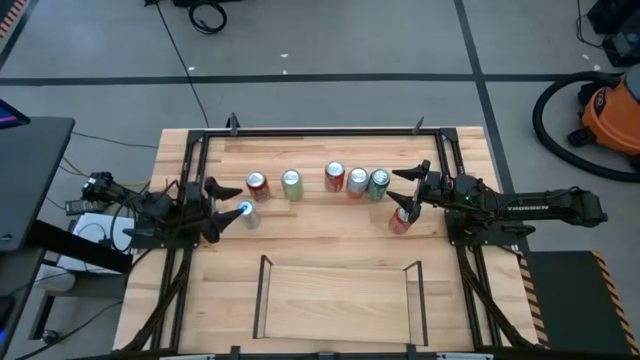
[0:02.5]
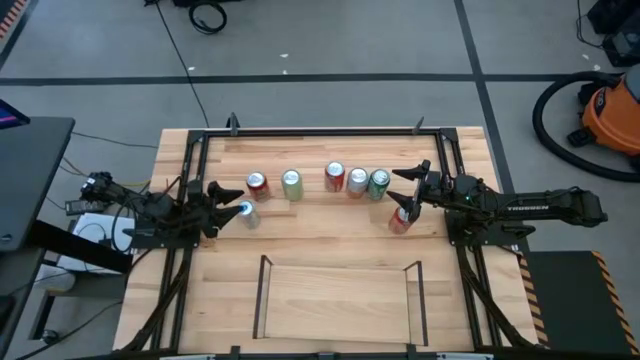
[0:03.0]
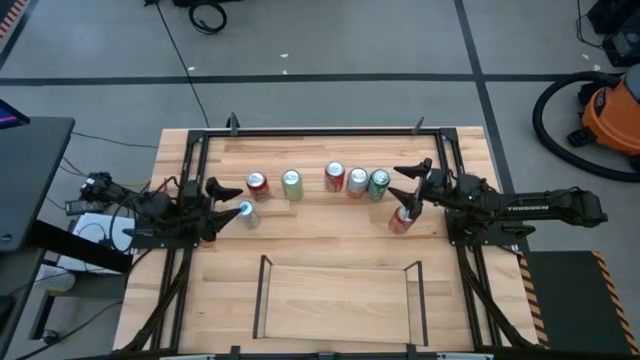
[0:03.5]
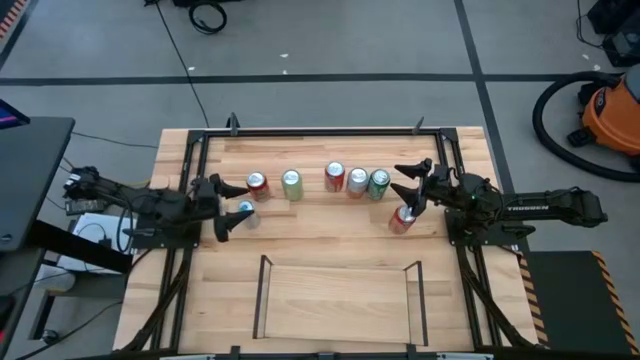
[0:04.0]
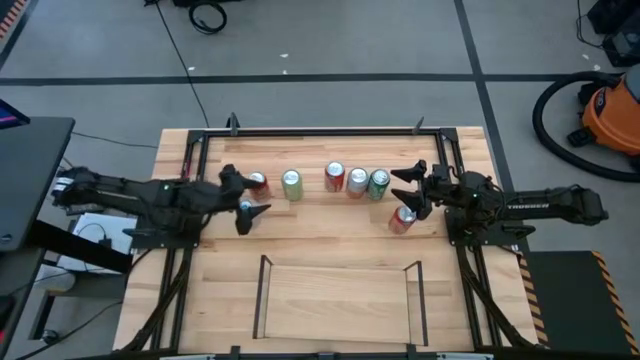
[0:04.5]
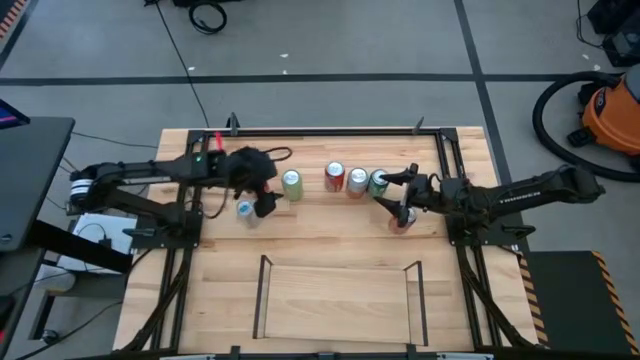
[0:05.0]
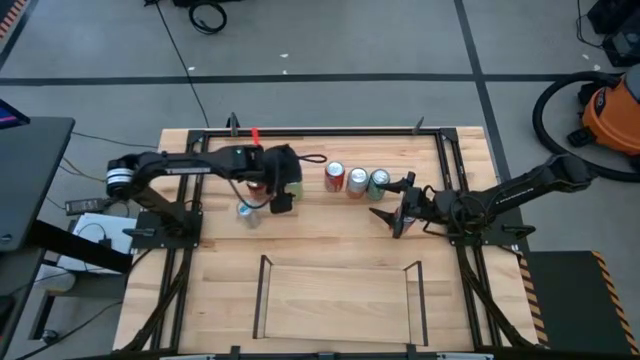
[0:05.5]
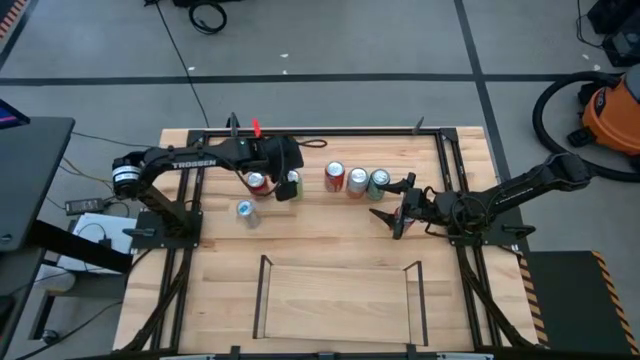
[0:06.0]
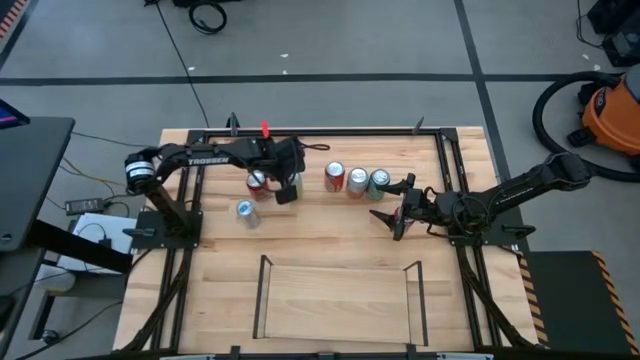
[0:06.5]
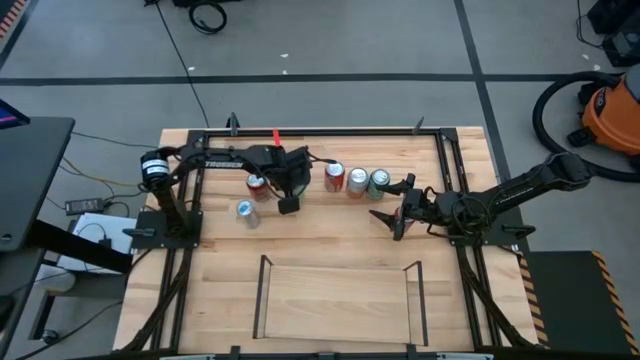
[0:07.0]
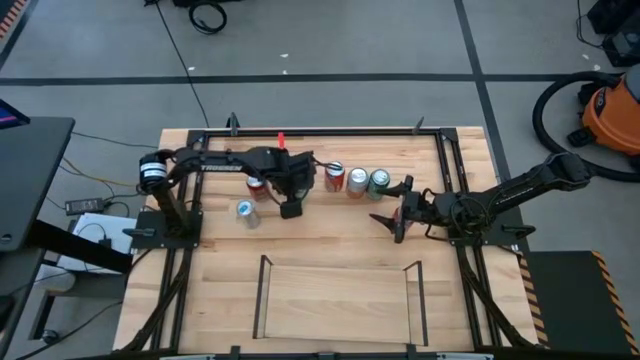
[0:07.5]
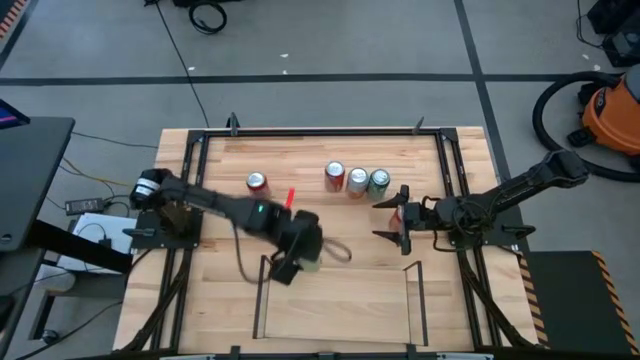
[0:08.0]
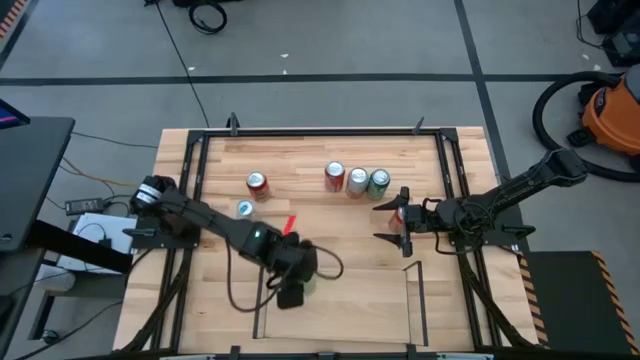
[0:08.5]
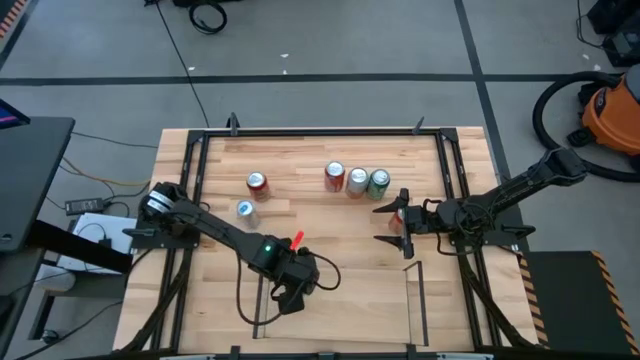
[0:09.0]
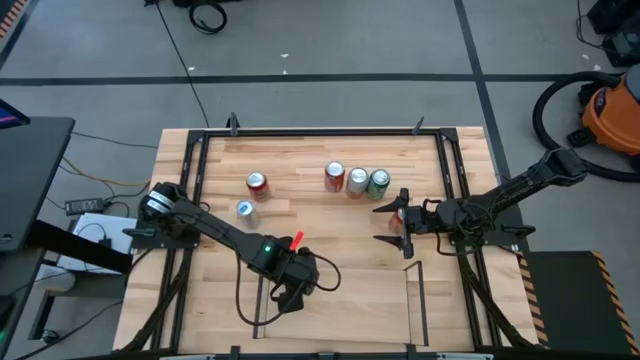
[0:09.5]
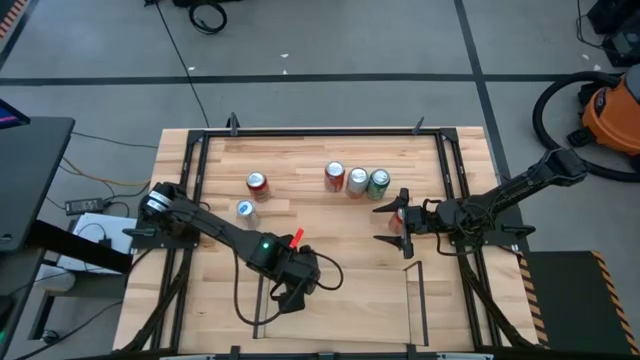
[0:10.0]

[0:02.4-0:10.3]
Task: Place canned beverage on shelf
Put the light green soda can on the shelf

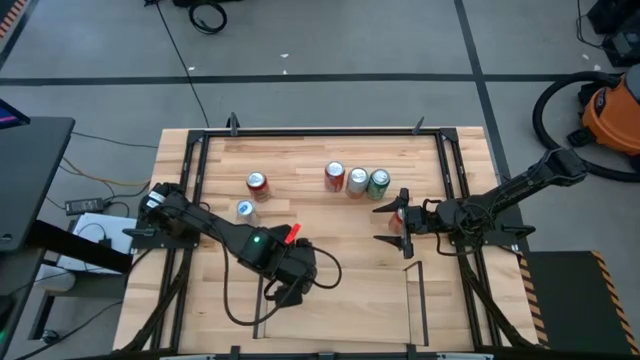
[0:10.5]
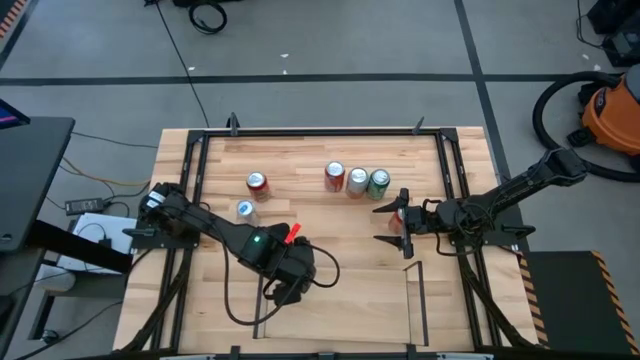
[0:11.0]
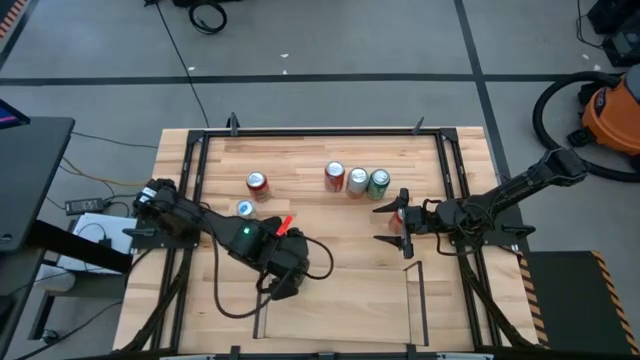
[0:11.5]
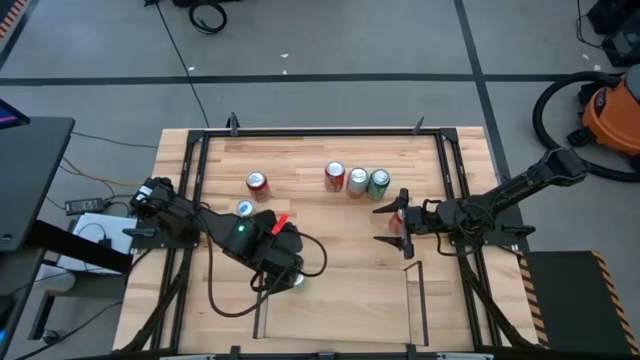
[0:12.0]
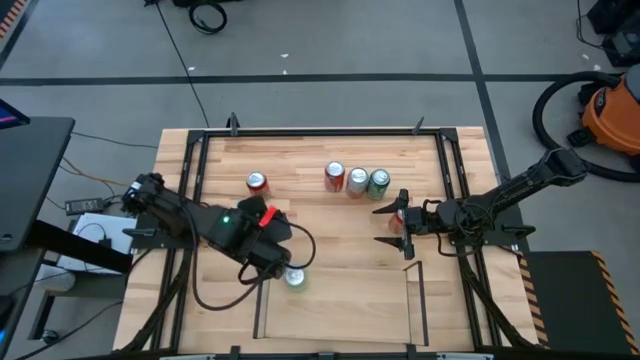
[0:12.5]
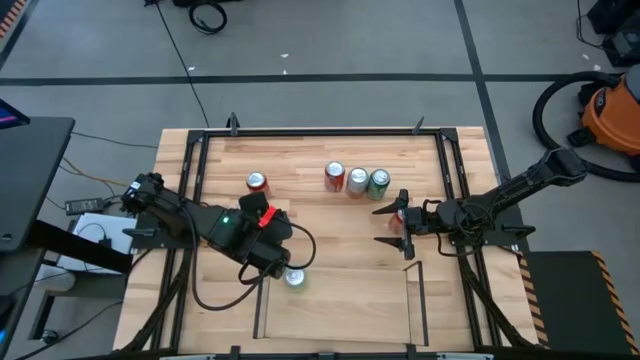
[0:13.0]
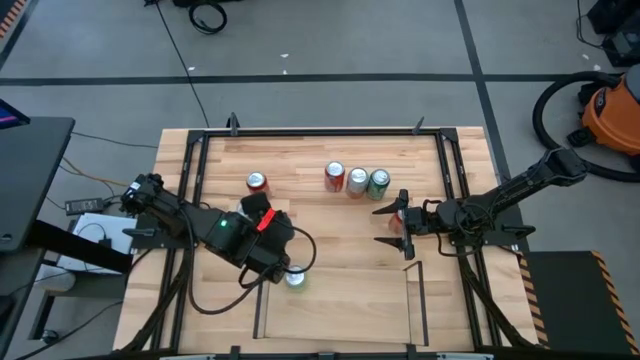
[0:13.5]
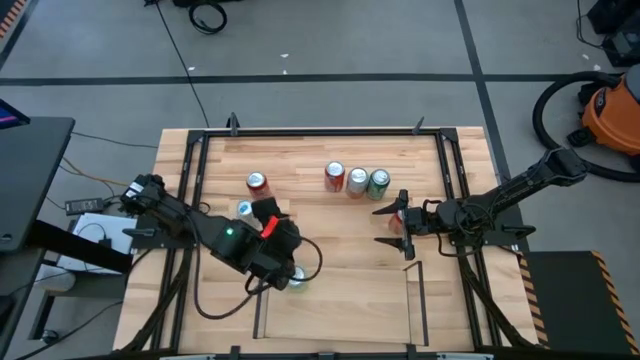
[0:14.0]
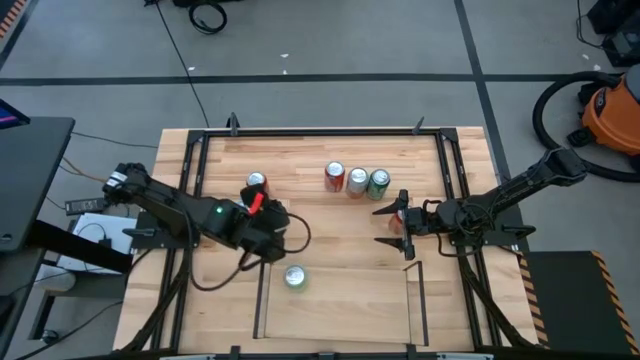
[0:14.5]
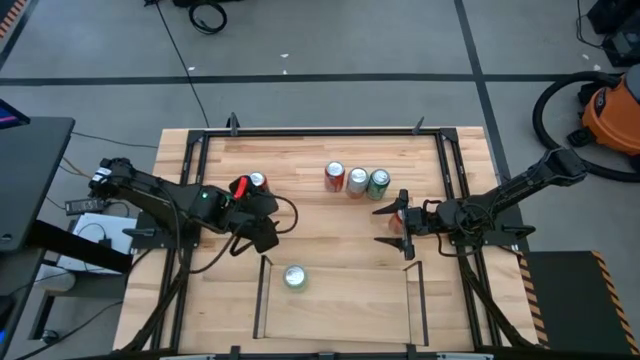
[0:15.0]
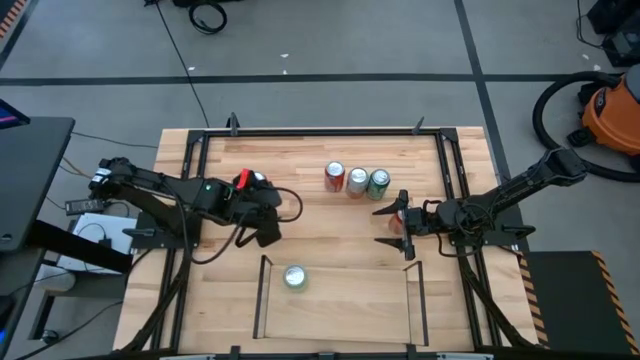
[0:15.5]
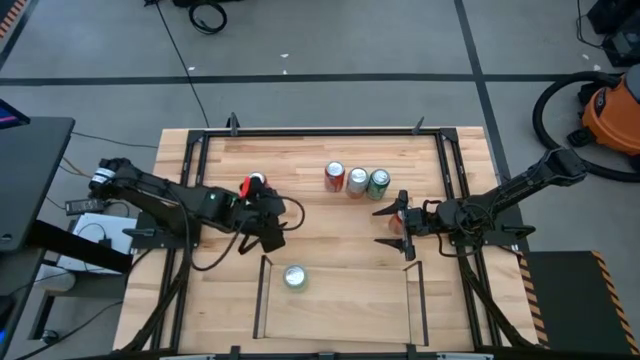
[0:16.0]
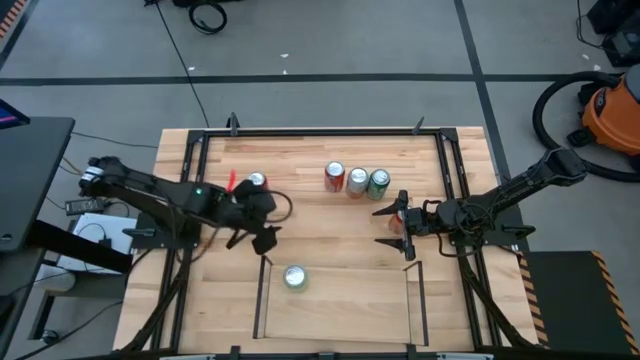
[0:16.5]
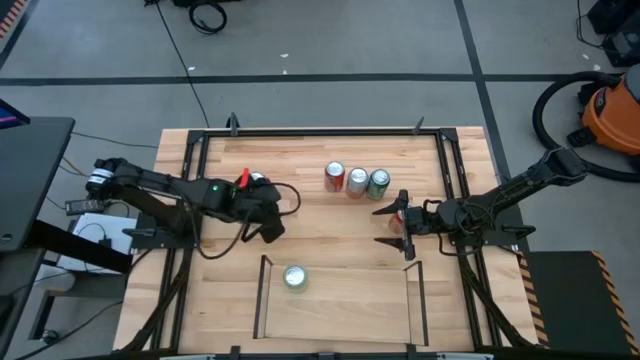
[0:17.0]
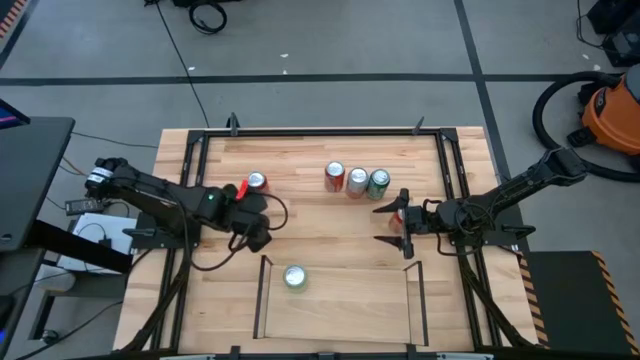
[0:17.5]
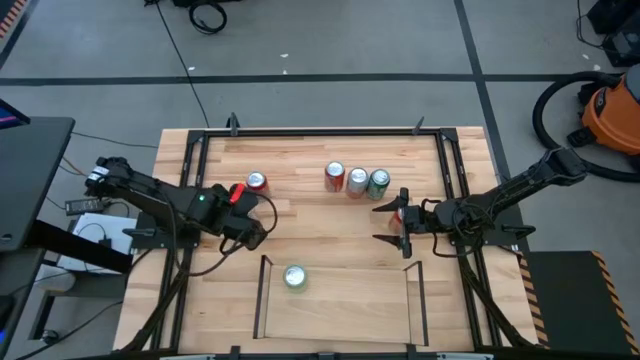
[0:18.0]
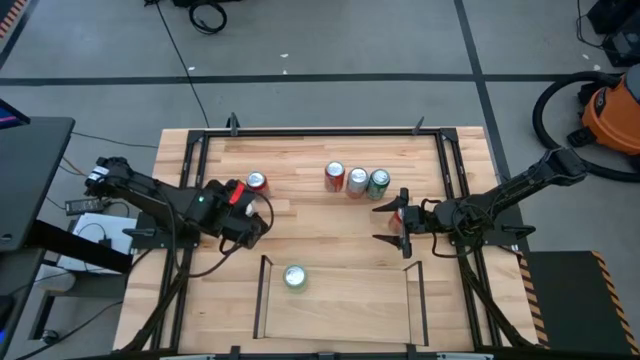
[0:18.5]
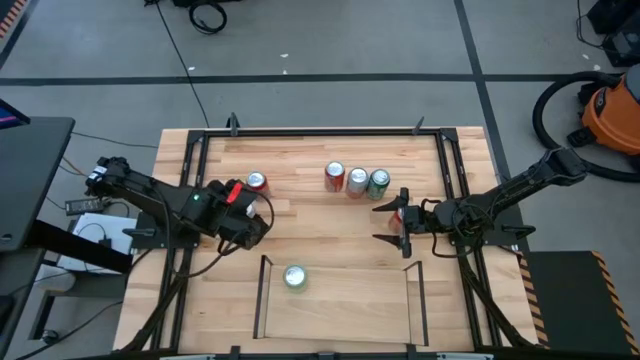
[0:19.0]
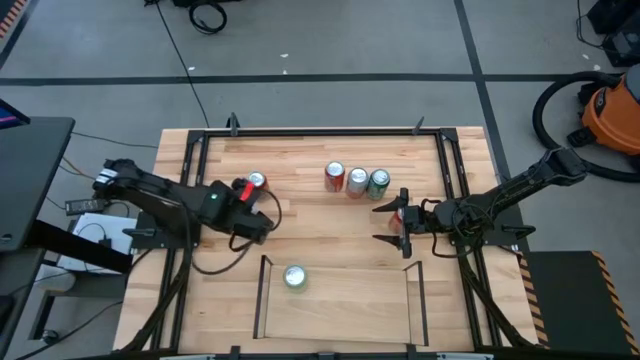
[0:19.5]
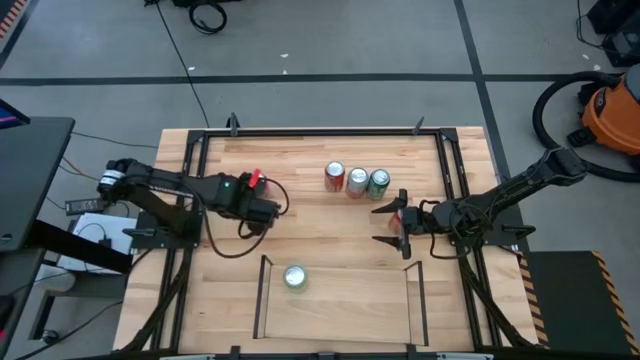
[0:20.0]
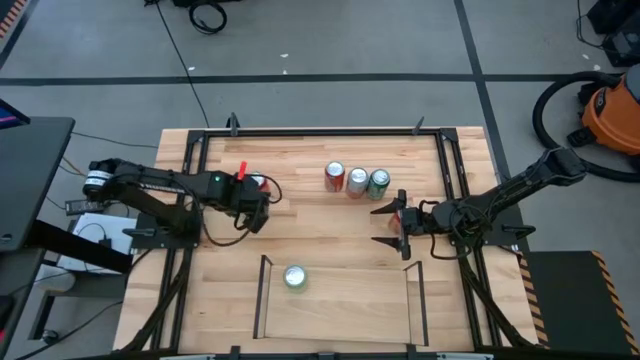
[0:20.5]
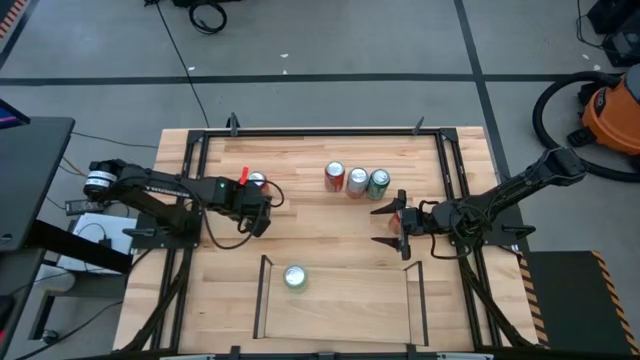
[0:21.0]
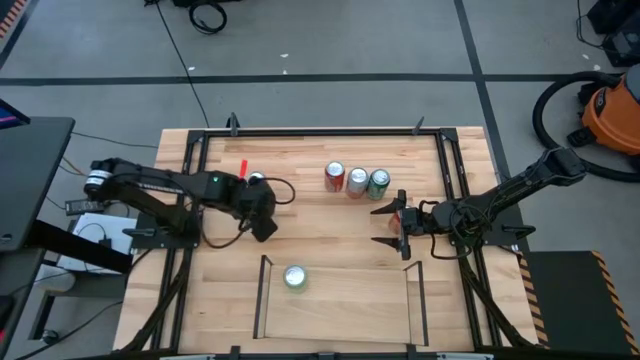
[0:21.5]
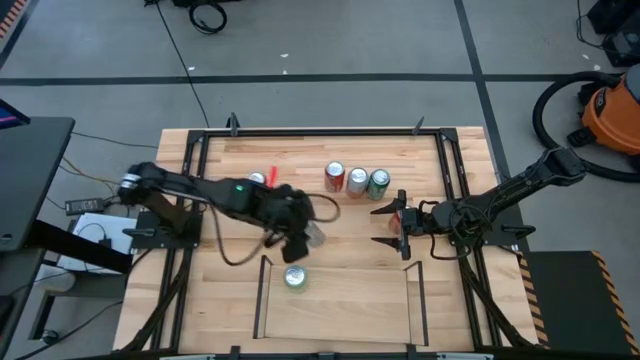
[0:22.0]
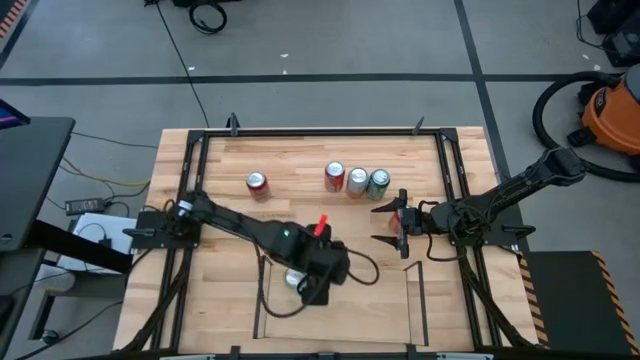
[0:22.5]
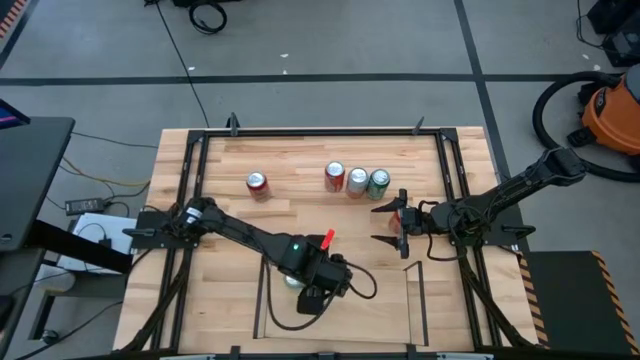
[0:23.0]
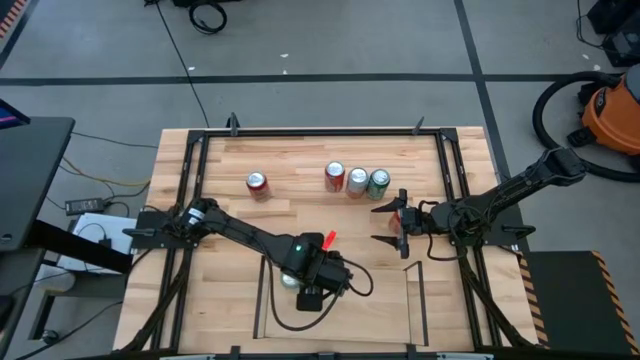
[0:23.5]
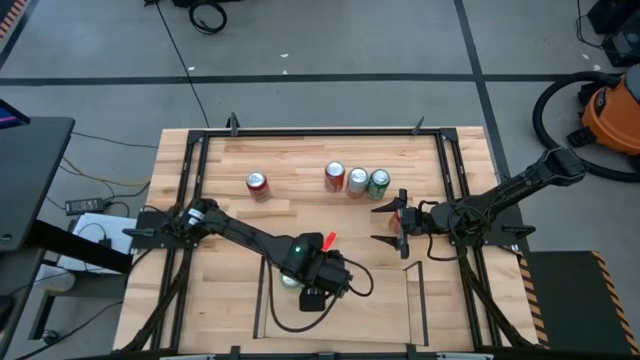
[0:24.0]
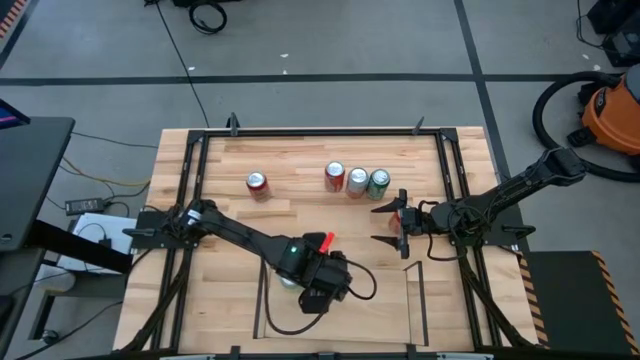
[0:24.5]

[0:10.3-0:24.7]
Put the blue soda can on the shelf
